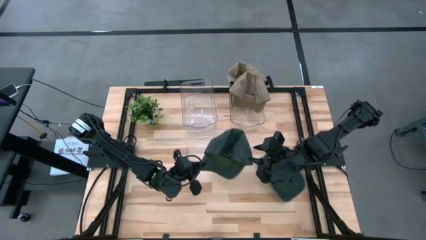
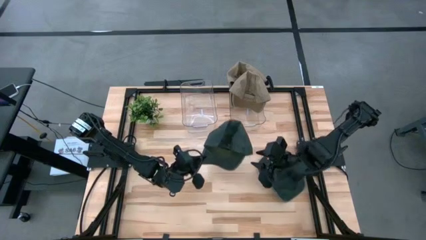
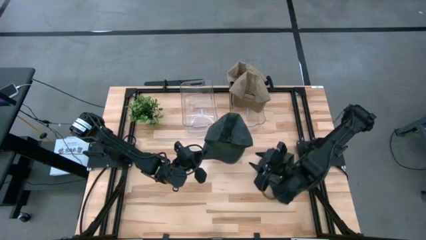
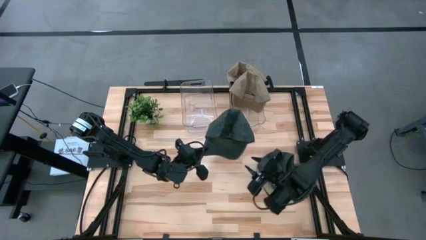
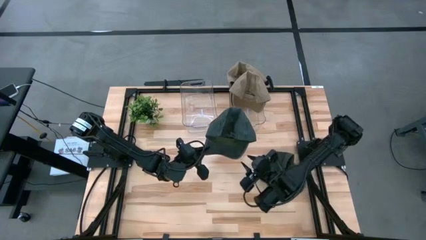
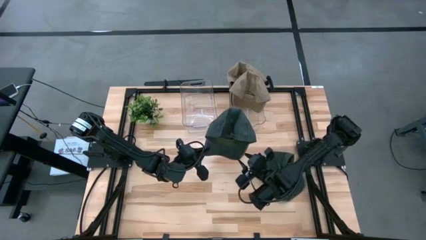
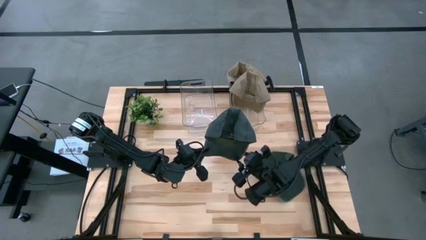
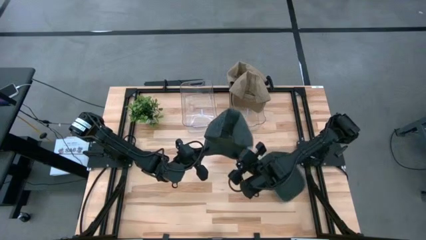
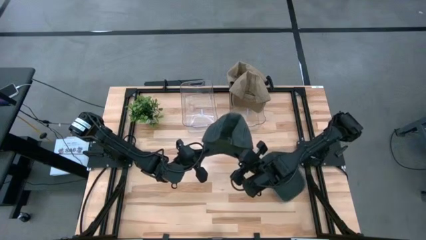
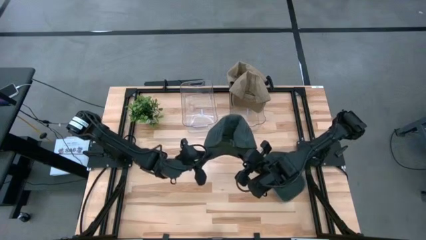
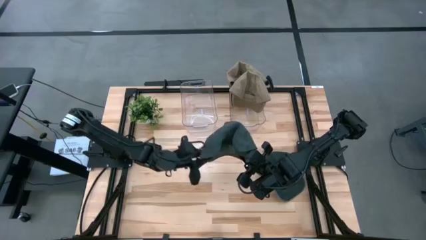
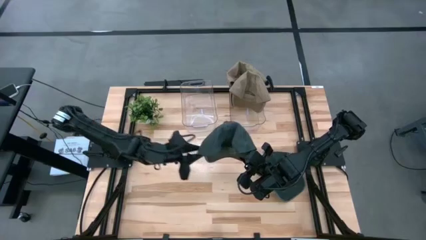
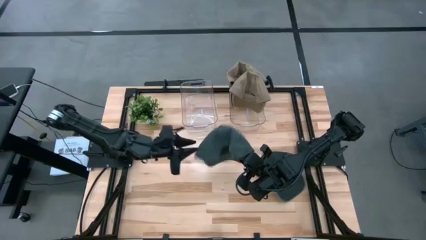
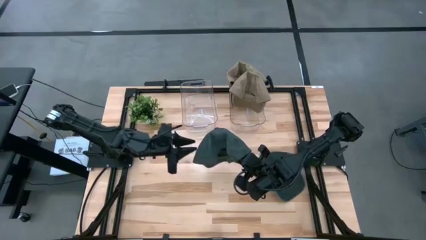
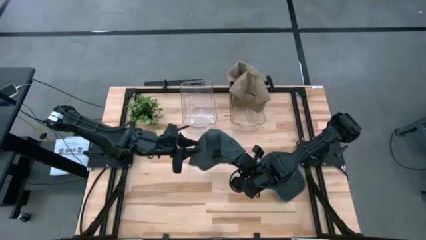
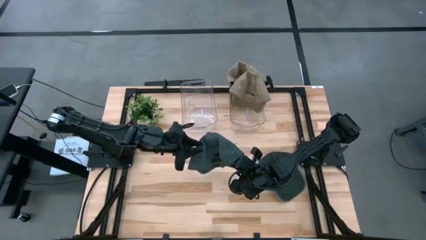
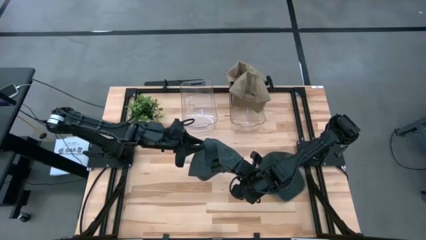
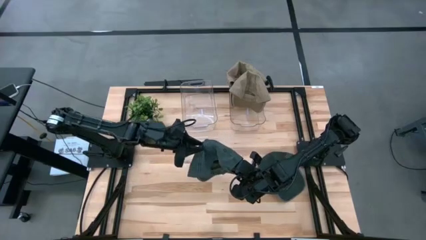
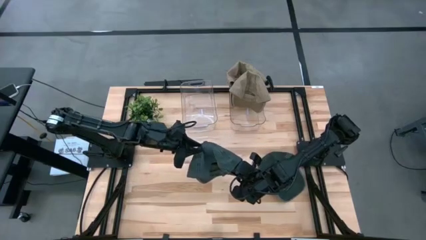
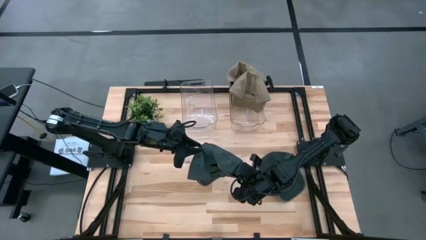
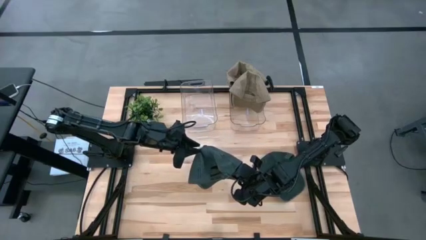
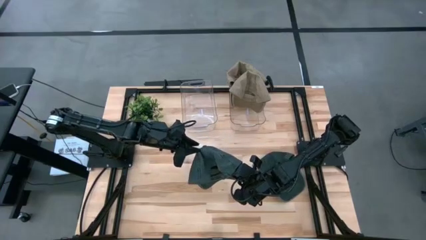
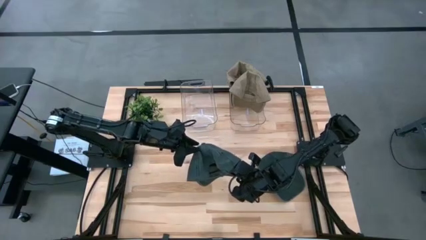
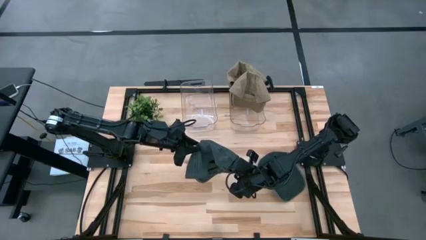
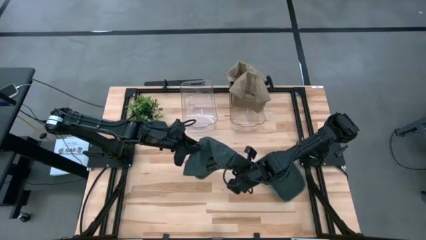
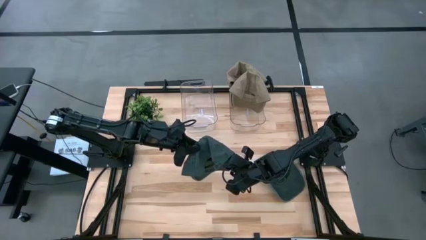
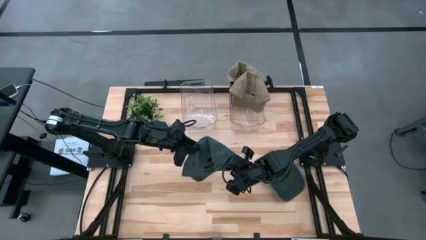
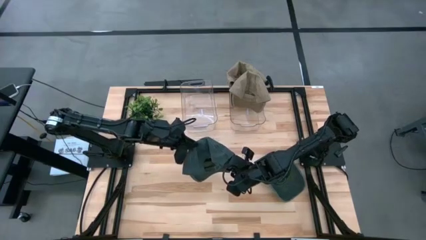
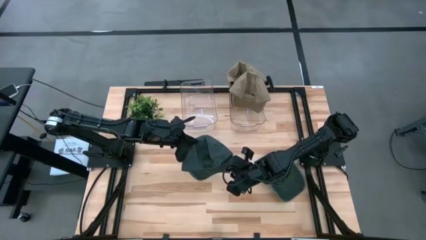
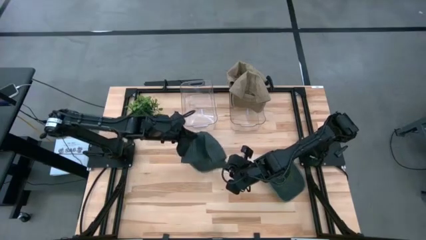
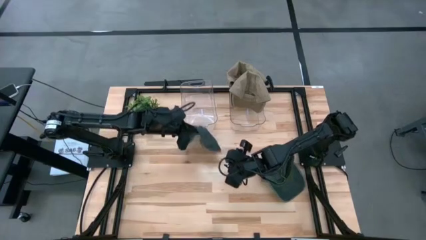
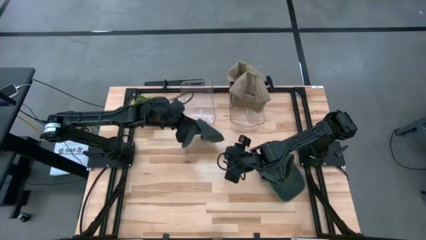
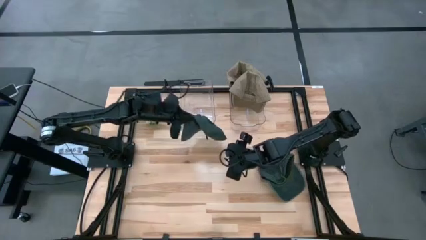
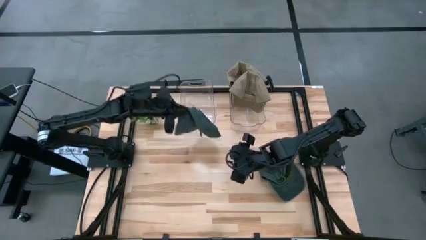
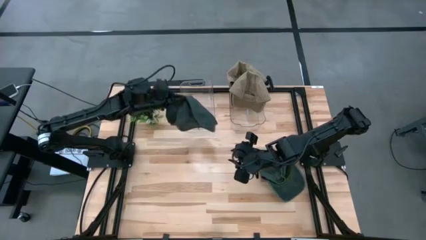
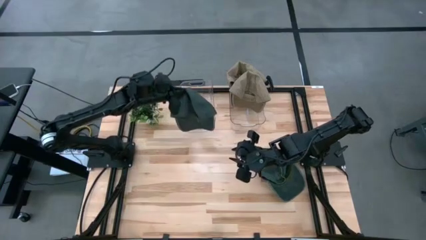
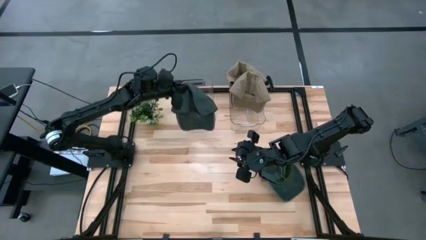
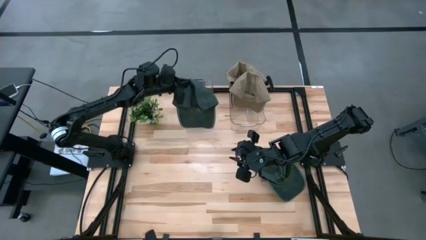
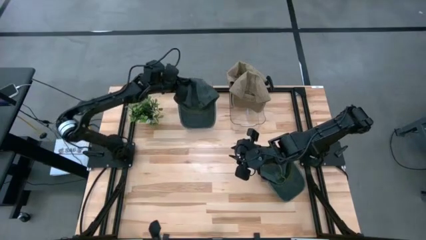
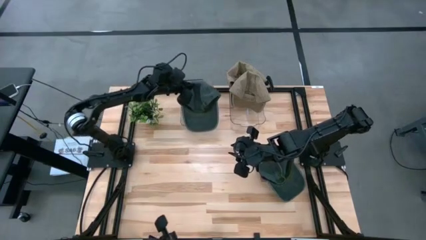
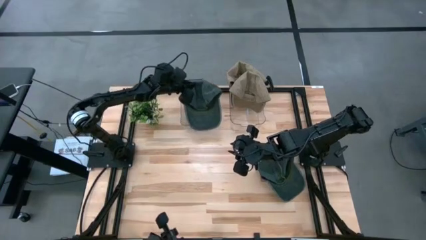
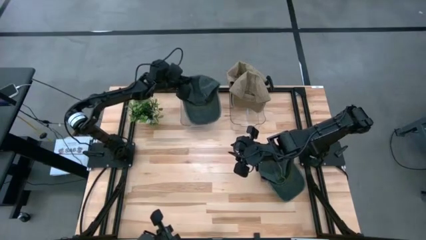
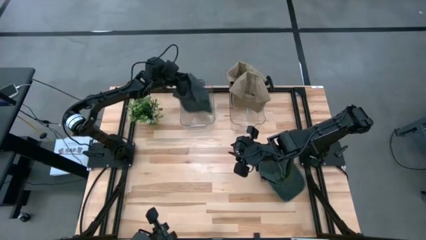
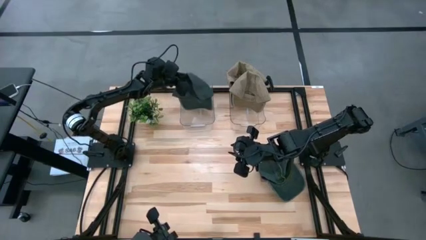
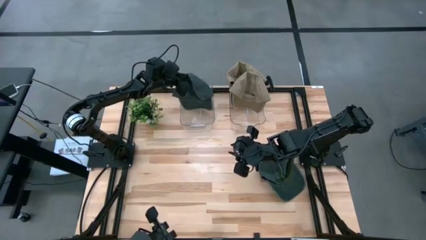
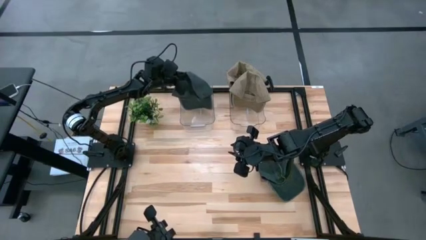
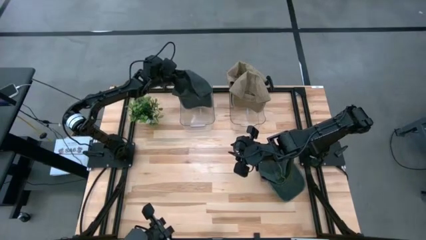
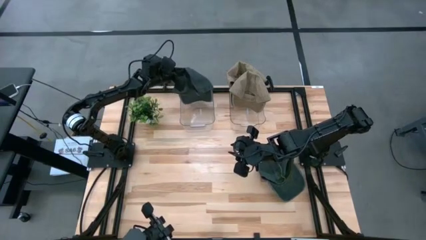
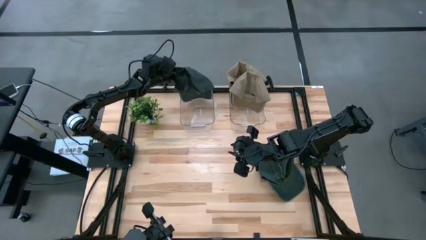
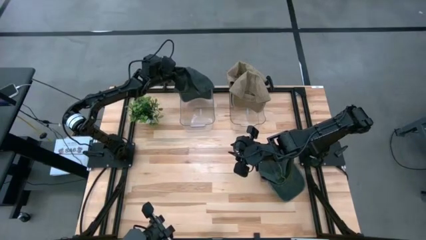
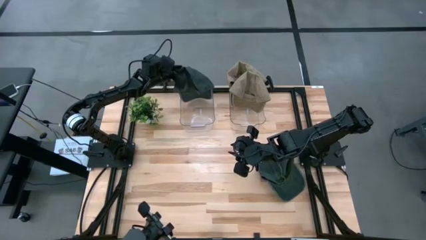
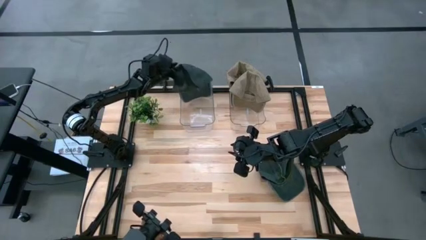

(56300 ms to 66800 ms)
Task: Pick & Place hat
Put the left black cap into the left transparent bin
